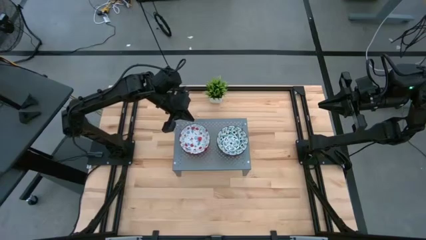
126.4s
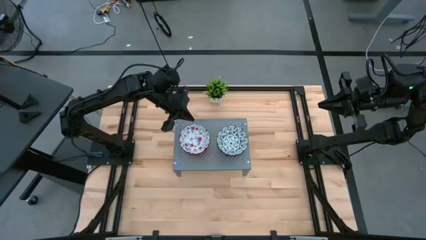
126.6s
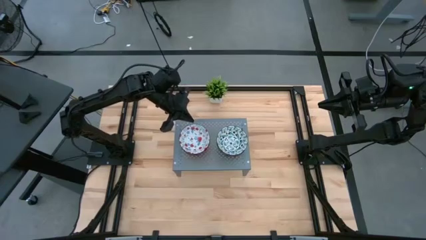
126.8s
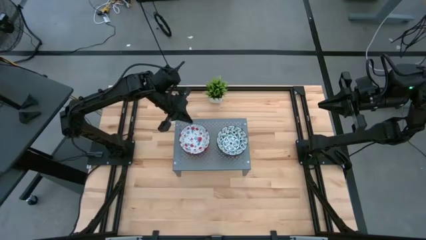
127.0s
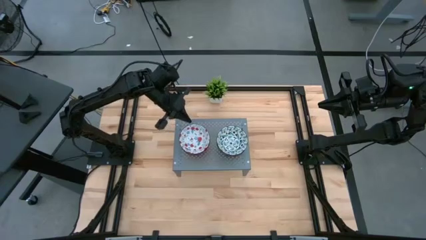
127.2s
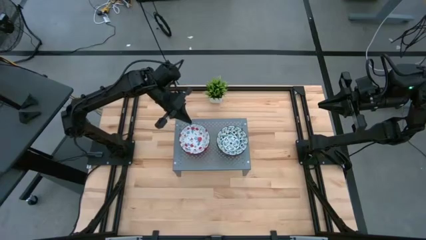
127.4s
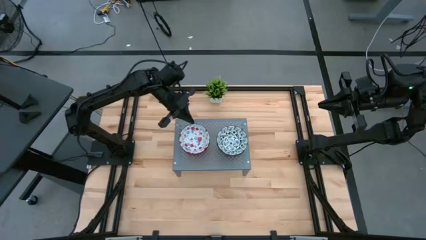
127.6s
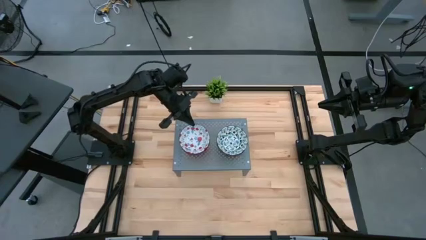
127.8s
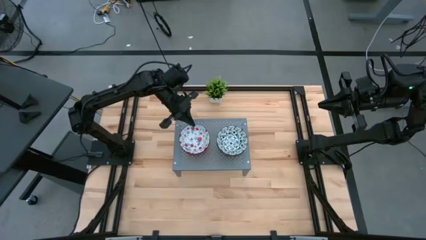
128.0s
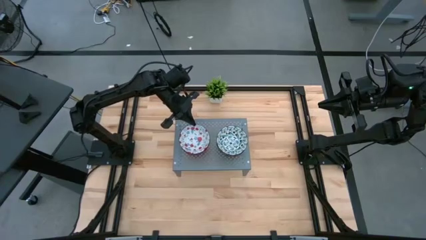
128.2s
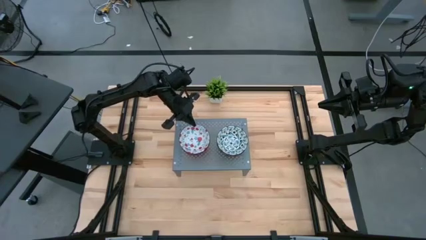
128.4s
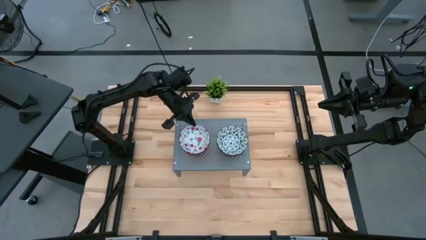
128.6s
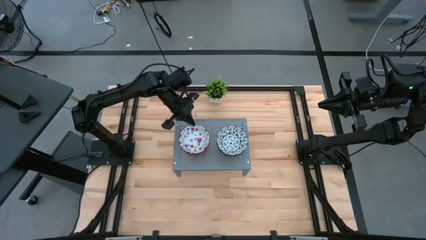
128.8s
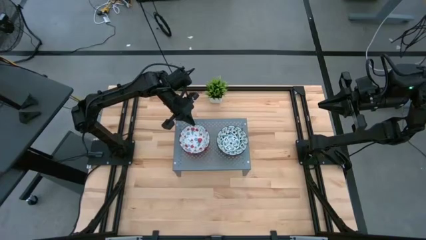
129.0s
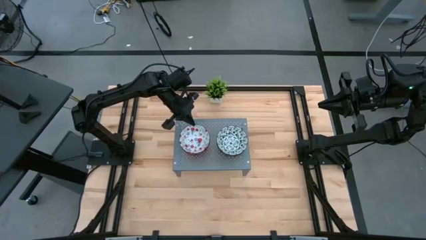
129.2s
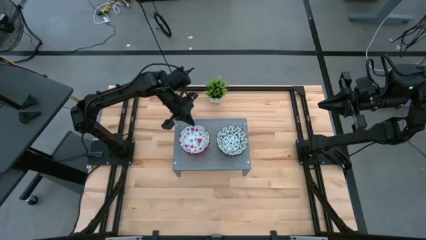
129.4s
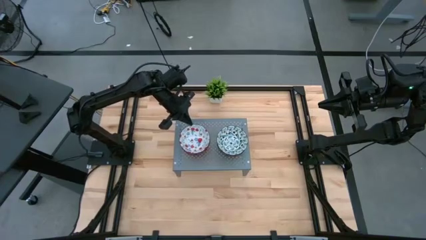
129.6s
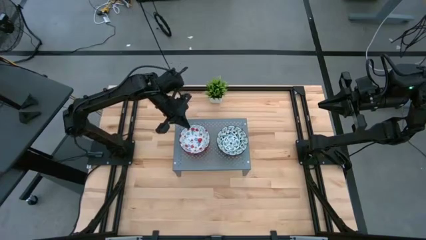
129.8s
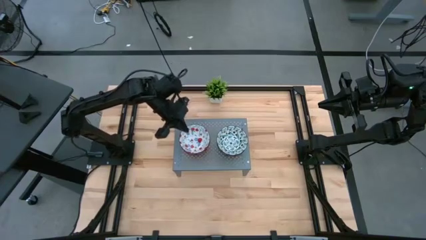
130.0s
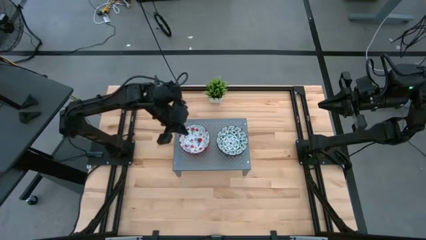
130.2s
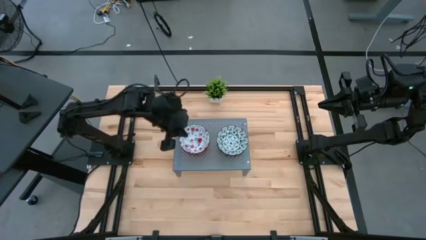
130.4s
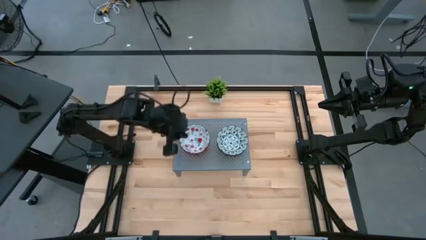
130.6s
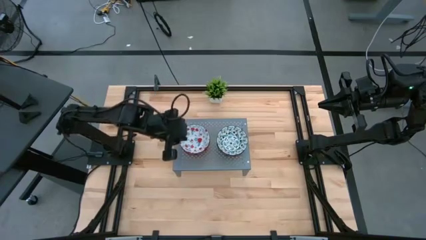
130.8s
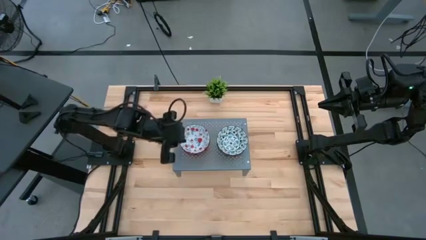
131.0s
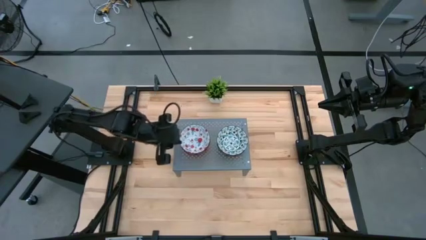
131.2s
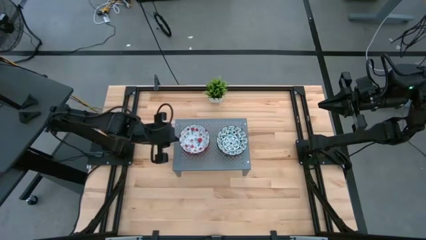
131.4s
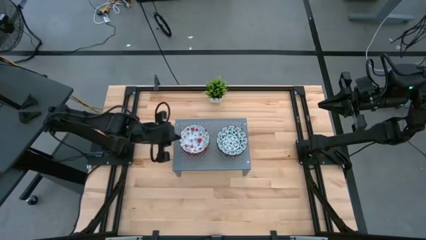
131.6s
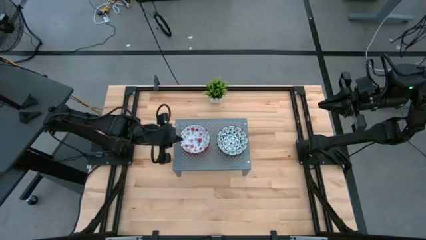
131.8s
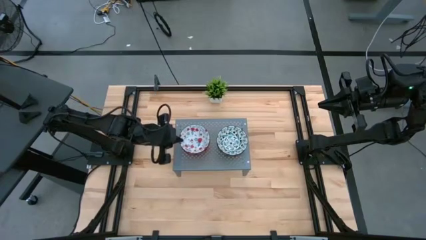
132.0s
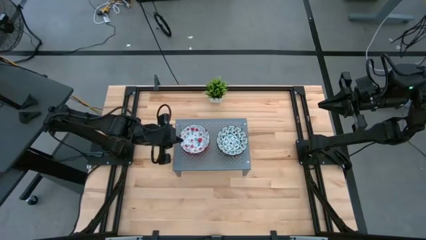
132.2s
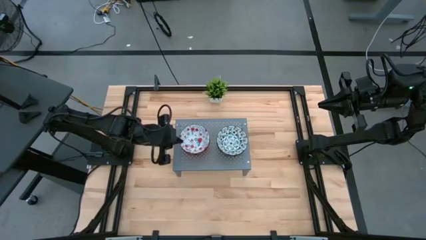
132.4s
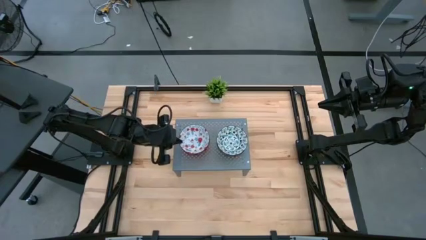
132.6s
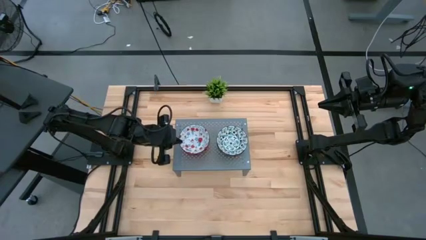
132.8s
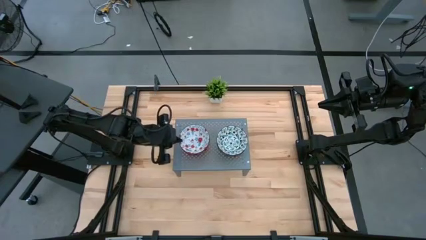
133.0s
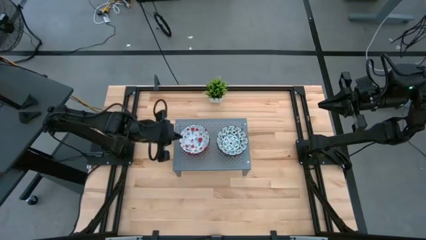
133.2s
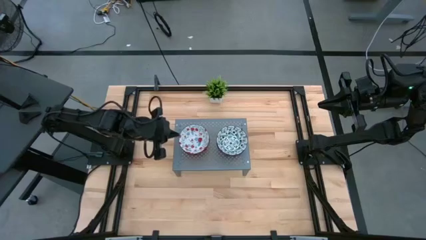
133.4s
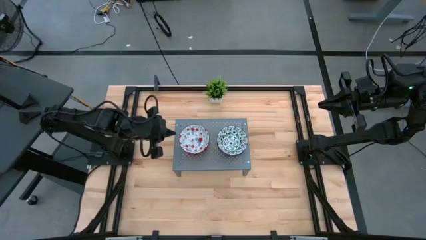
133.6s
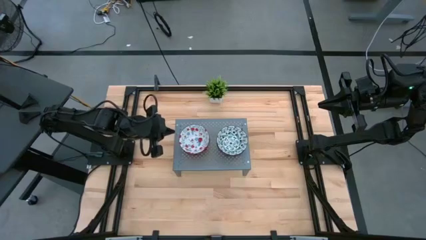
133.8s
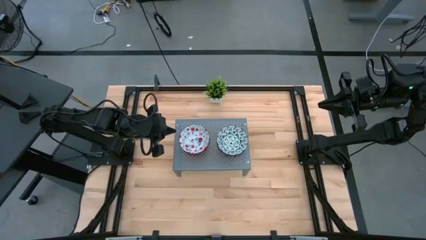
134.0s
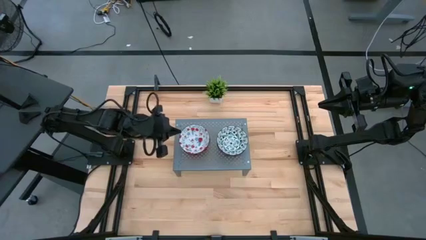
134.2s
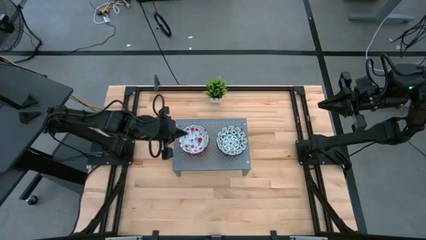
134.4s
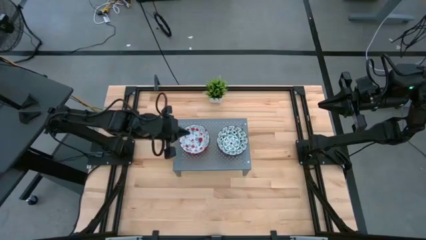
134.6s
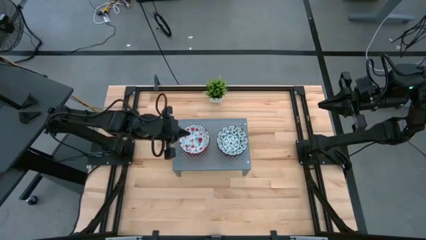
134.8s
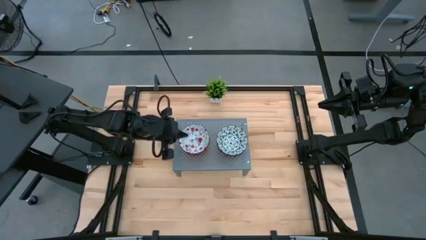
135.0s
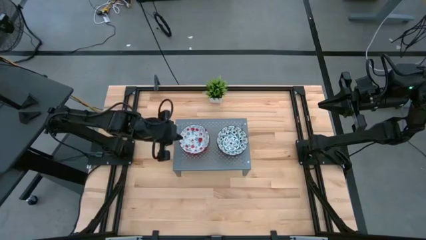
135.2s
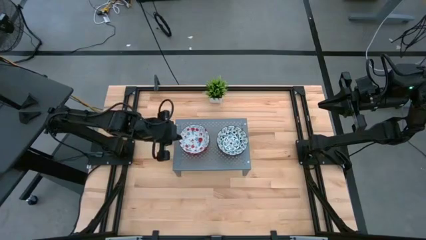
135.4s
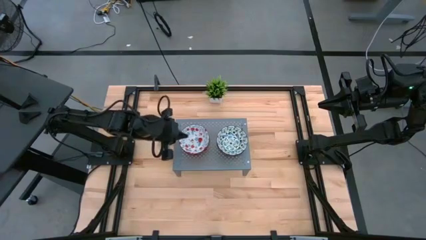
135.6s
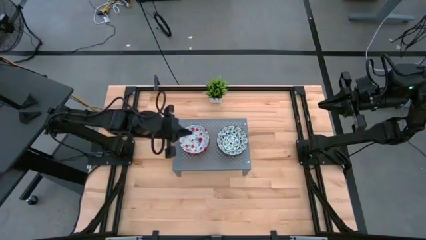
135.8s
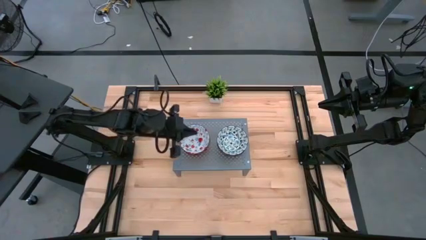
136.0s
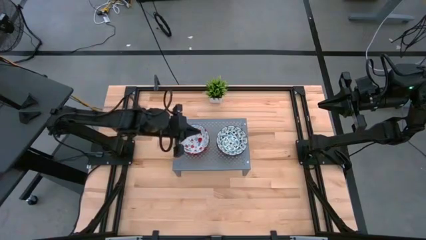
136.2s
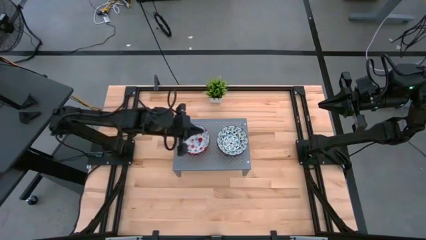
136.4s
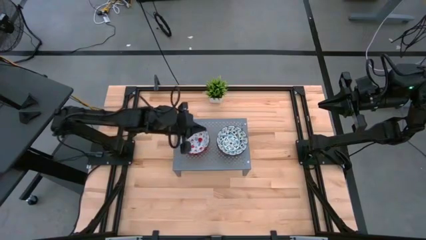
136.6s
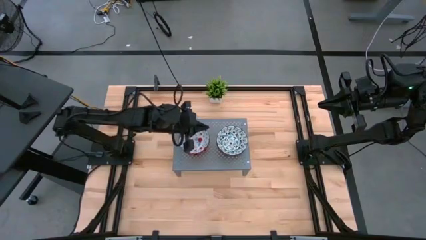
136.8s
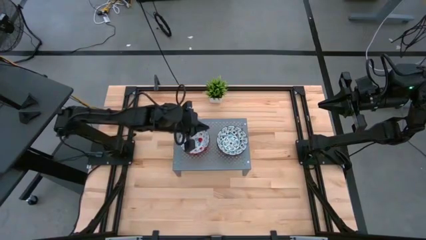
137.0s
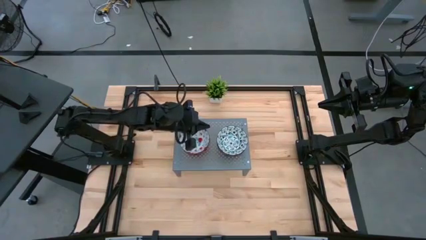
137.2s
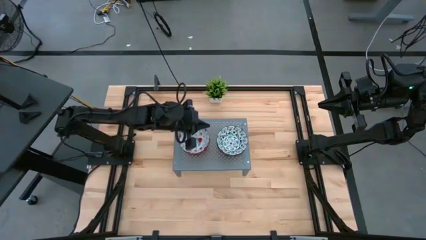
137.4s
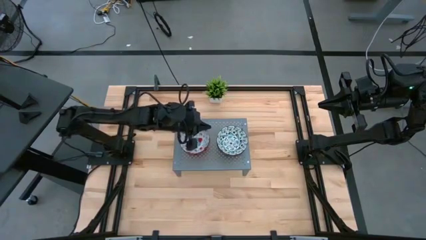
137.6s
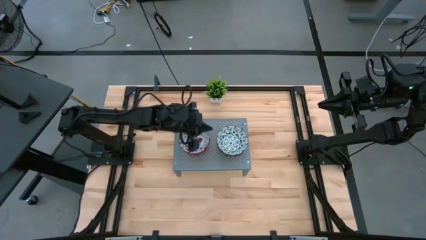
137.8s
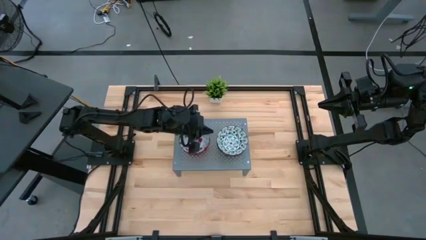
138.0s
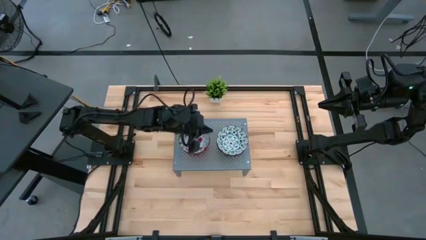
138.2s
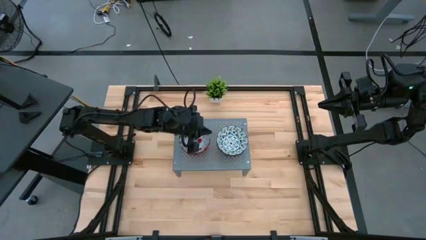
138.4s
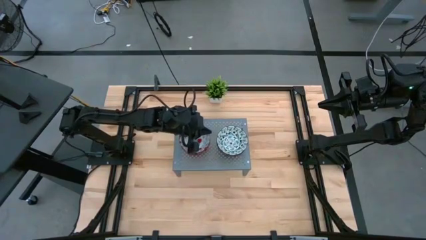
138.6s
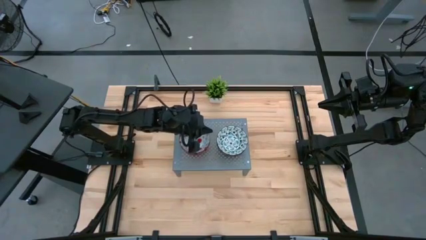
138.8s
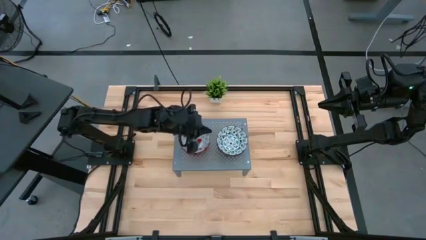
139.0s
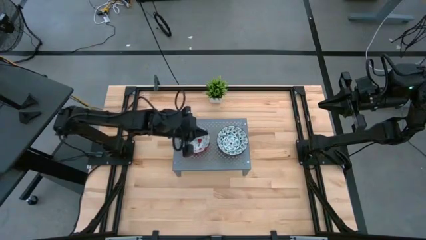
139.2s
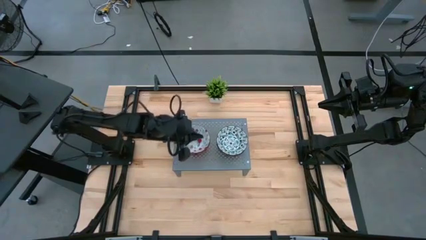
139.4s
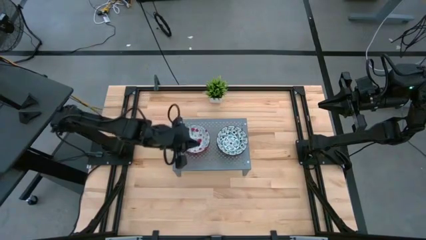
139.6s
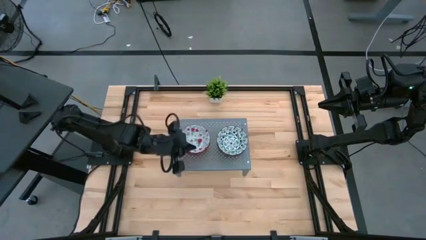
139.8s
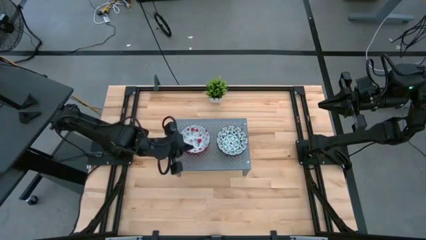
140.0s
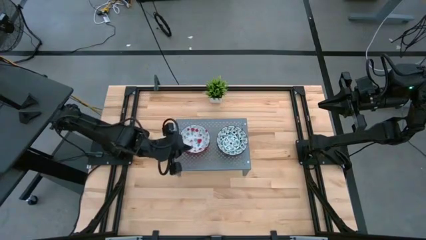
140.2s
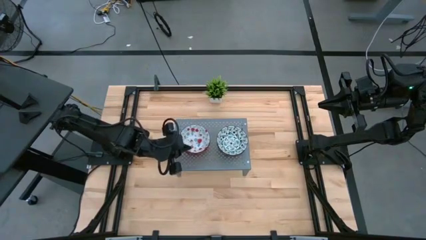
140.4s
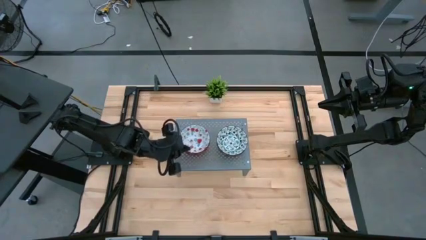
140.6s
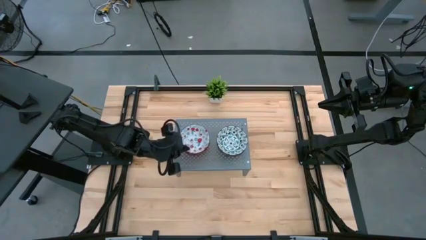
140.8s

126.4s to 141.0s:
Task: Pick & Place Mini bowls
Stack the red patterned bowl on the other red patterned bowls on the shelf
